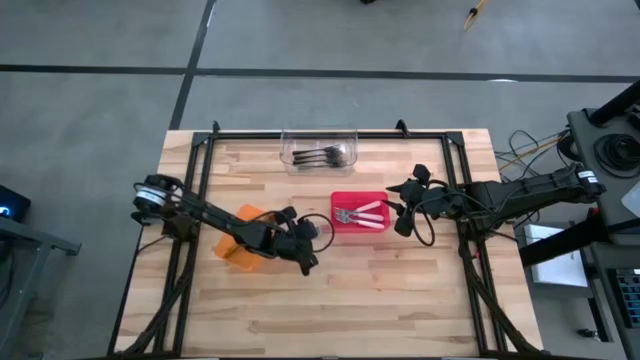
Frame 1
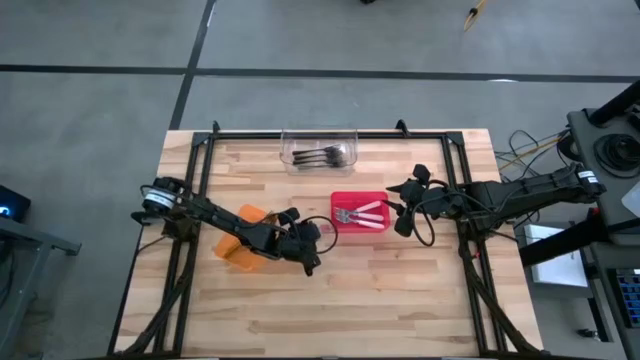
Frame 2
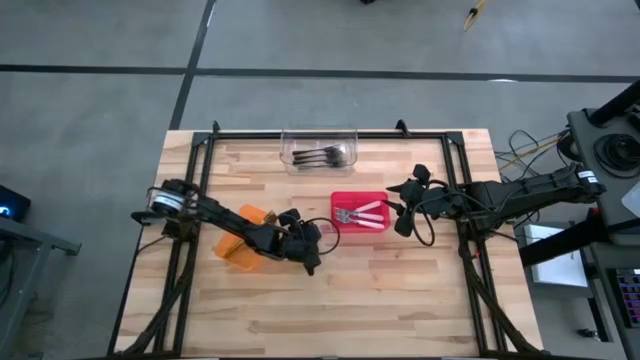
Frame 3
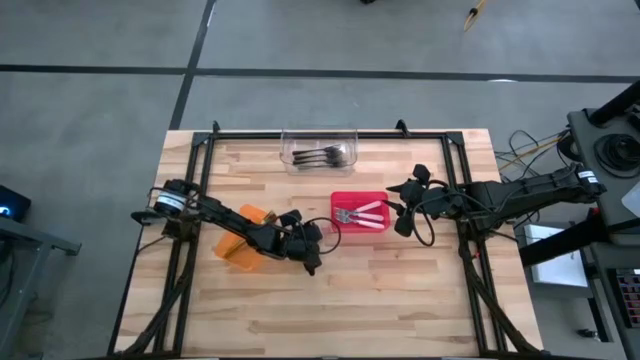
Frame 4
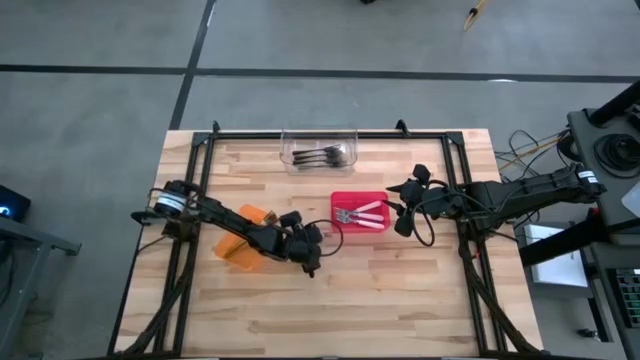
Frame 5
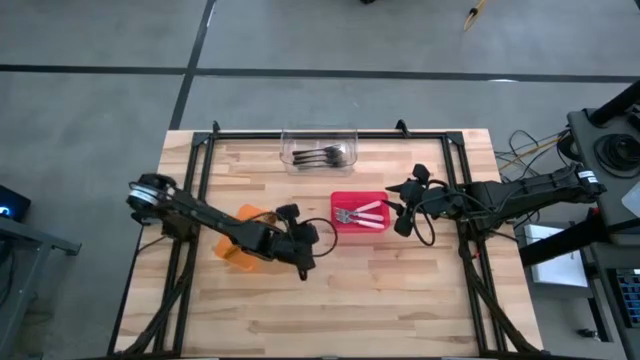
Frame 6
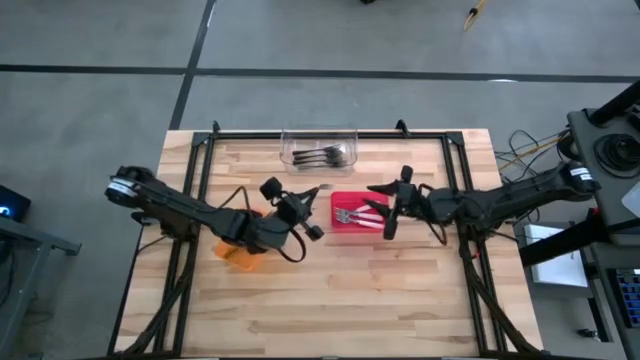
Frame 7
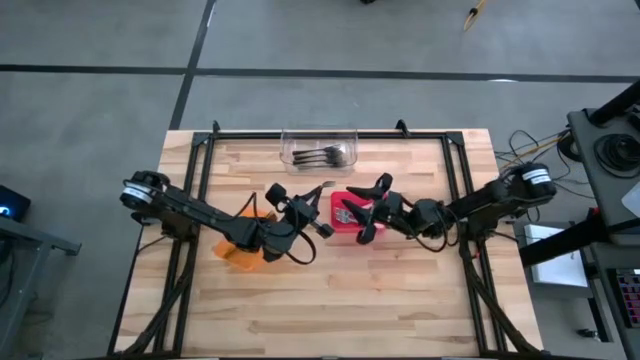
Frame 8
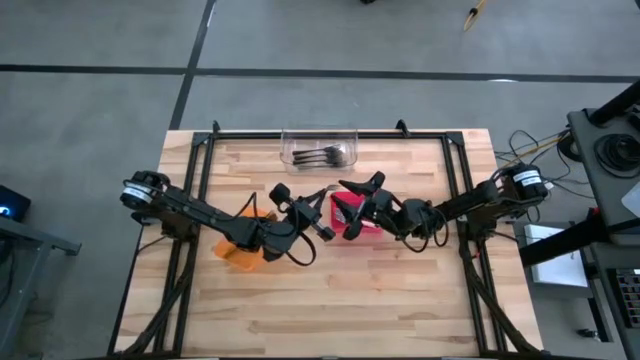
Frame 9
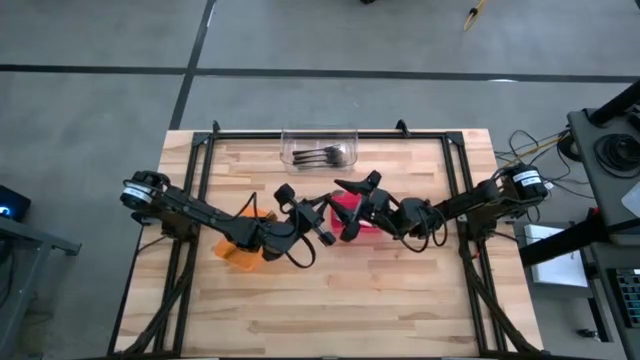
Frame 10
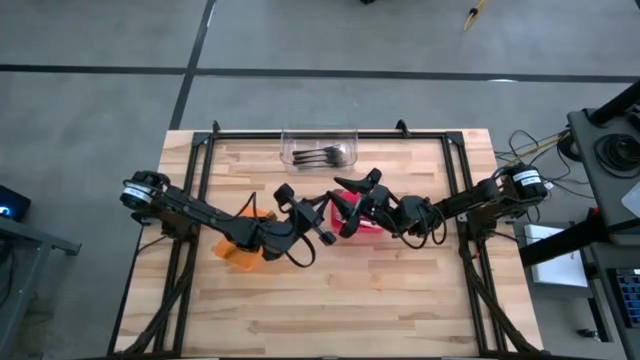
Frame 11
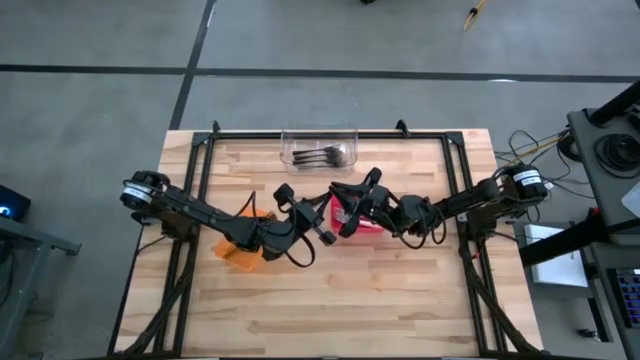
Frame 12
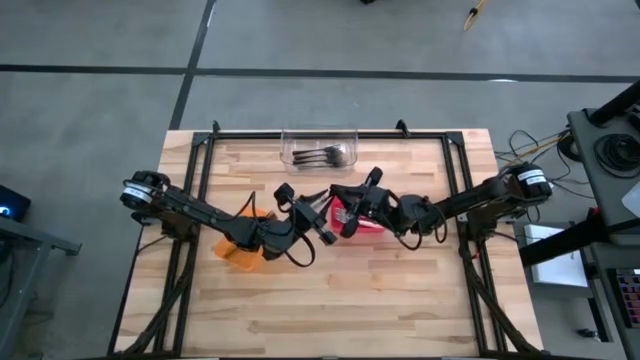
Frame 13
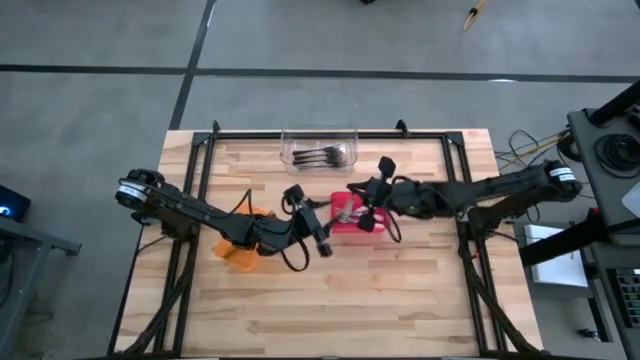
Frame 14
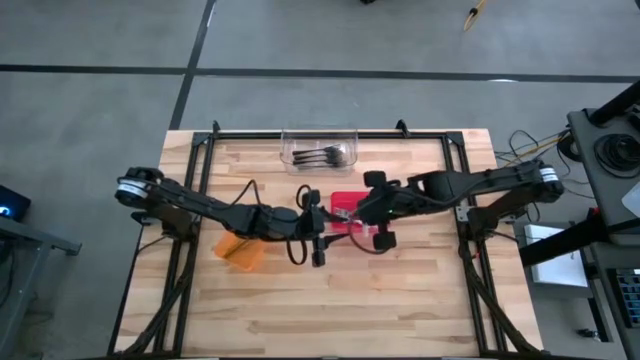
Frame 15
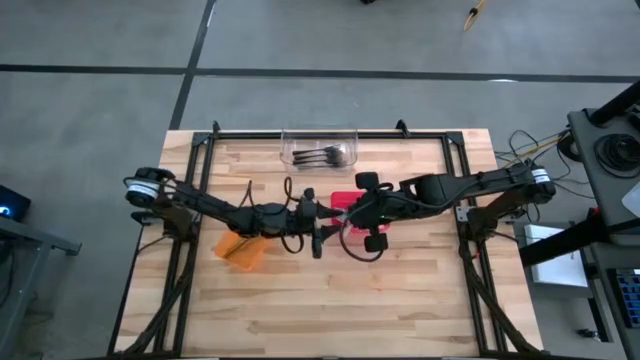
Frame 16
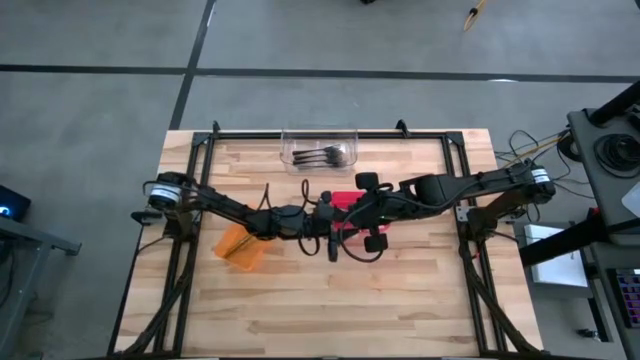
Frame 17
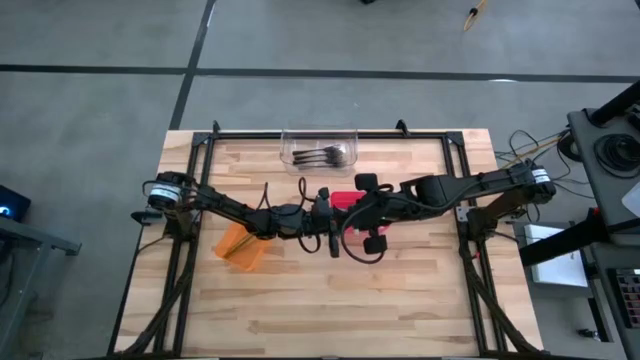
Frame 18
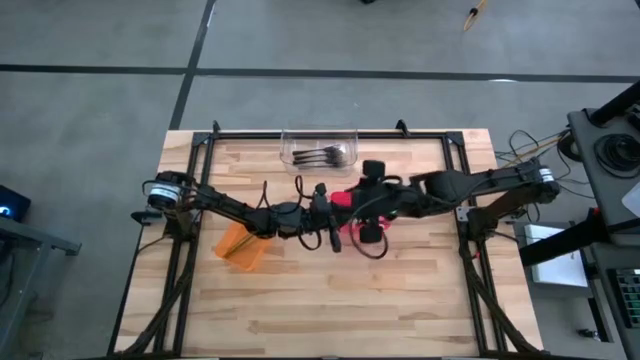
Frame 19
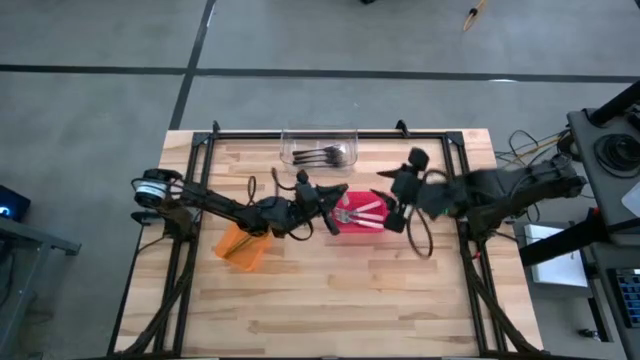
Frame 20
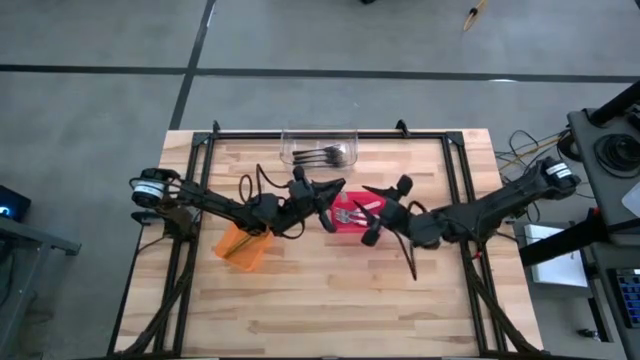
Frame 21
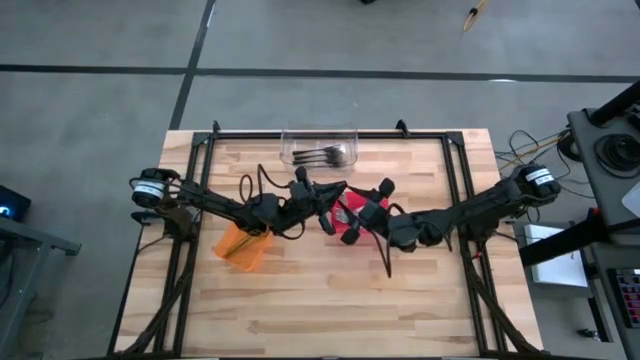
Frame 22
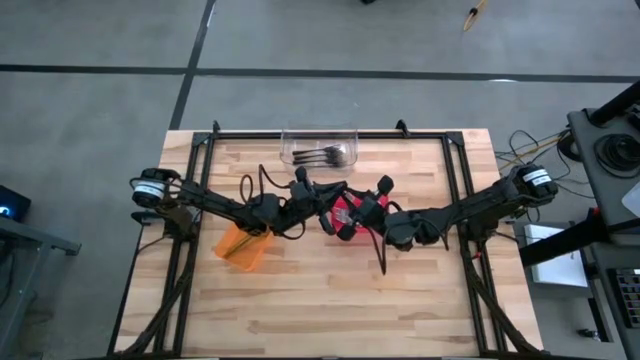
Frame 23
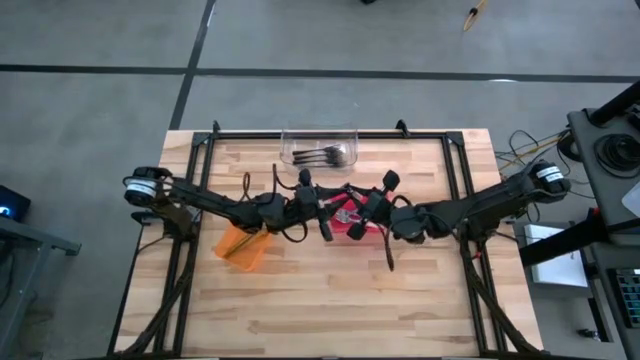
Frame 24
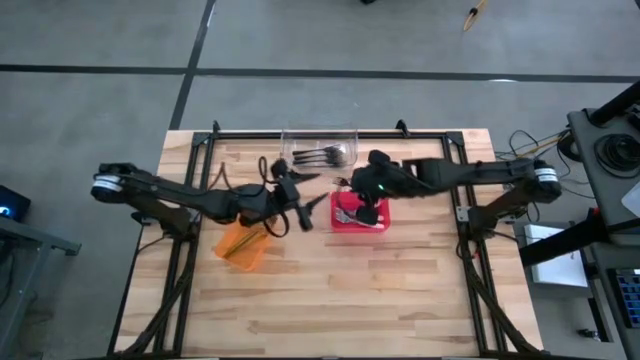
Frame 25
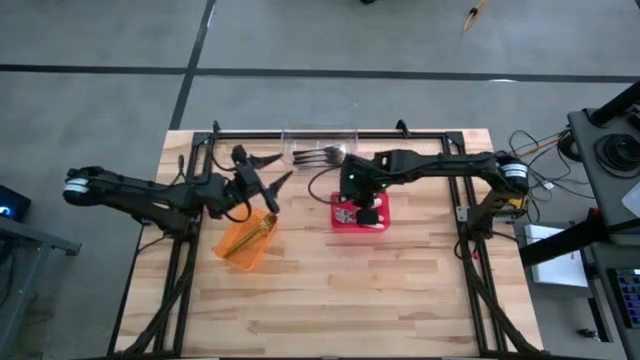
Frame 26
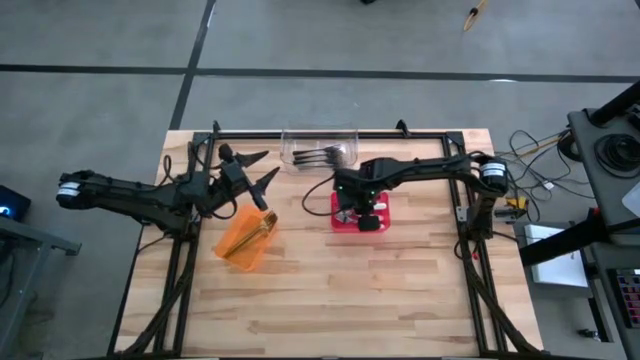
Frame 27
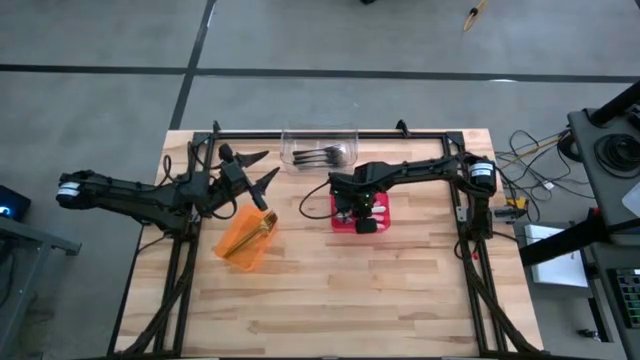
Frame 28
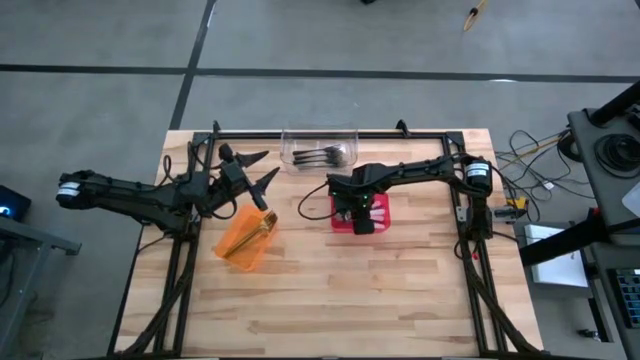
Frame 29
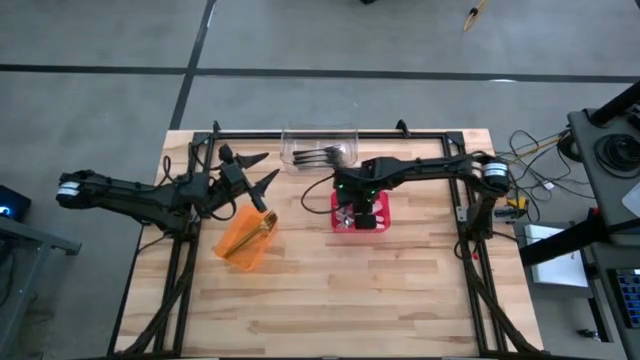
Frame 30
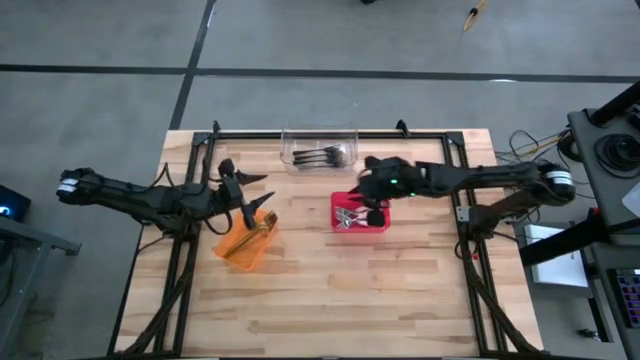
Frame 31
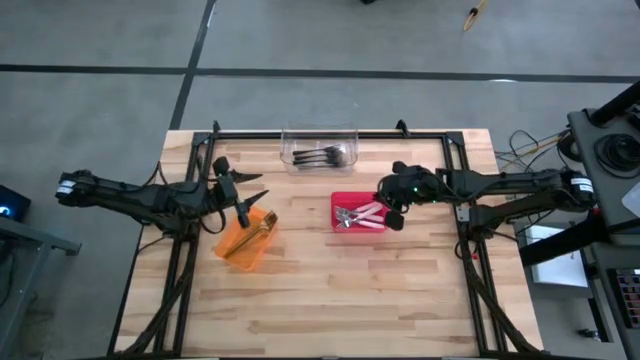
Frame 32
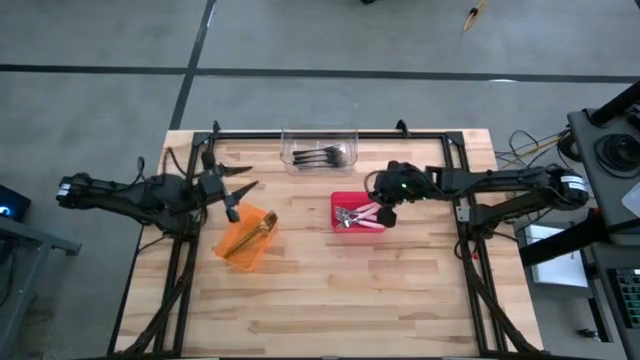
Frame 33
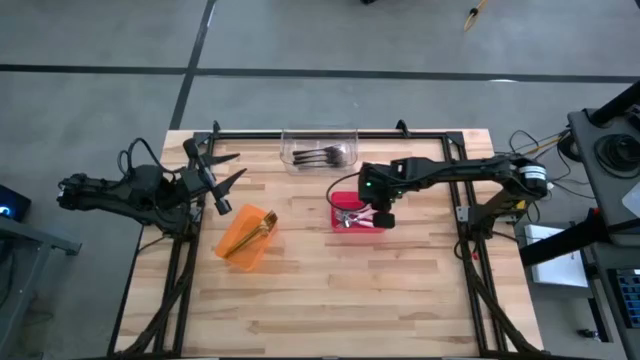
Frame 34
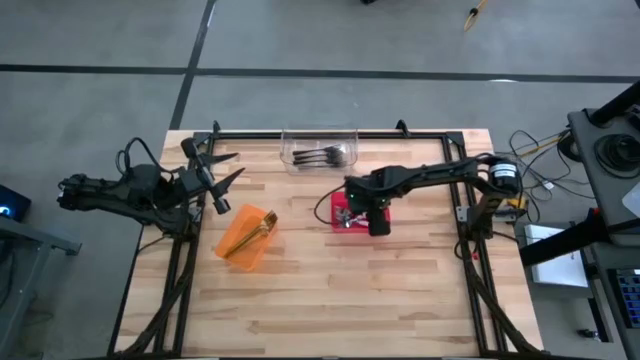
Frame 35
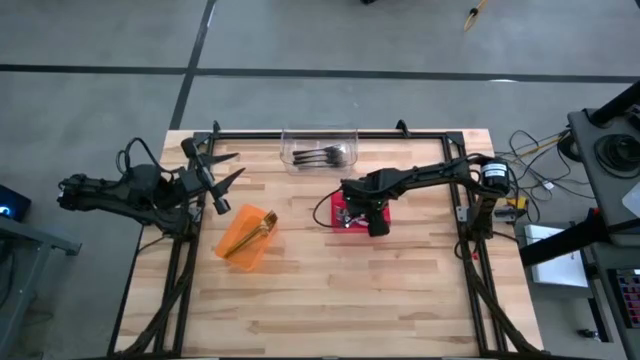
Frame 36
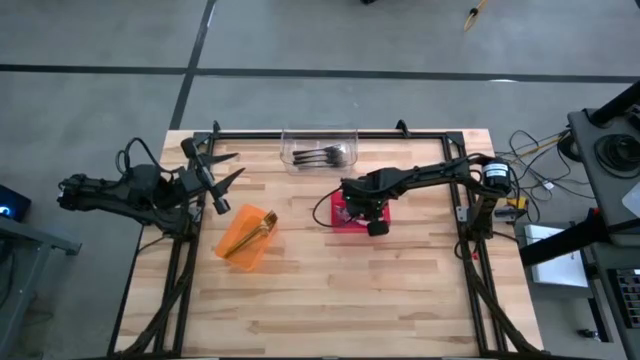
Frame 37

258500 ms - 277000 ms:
Task: Sort silverware by color (type)
Put the white fork into the red bin
